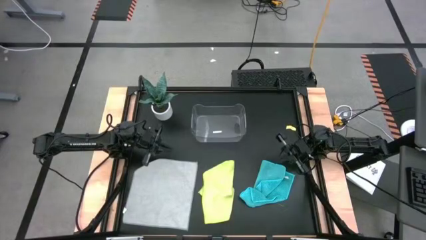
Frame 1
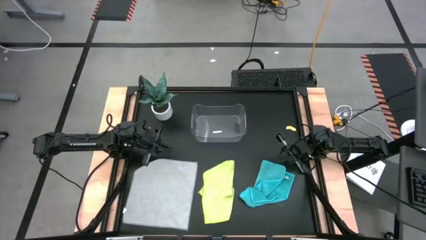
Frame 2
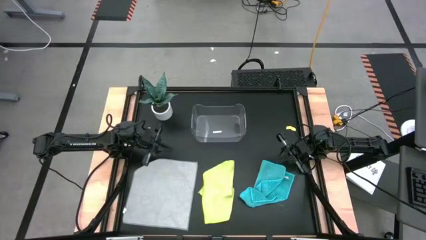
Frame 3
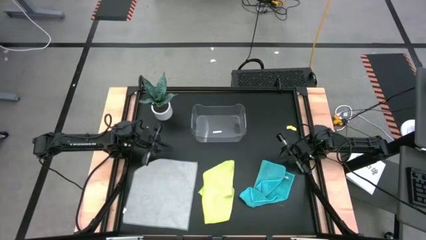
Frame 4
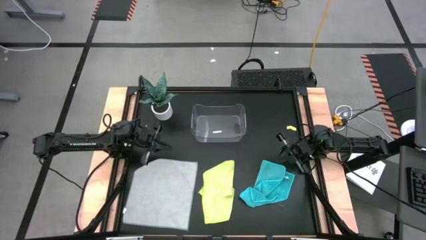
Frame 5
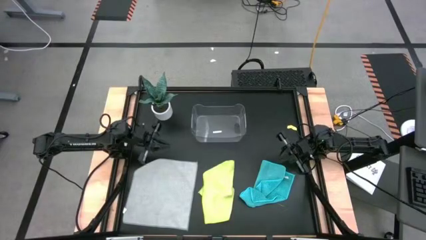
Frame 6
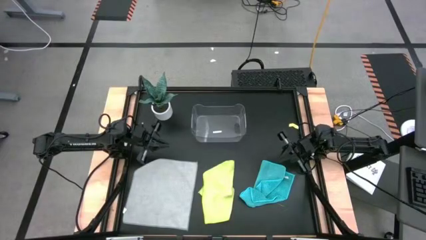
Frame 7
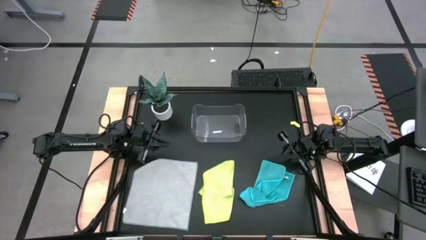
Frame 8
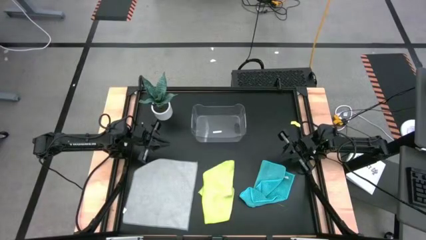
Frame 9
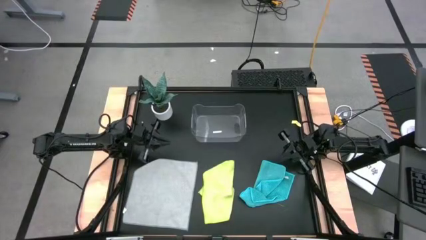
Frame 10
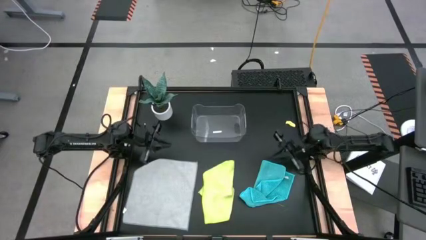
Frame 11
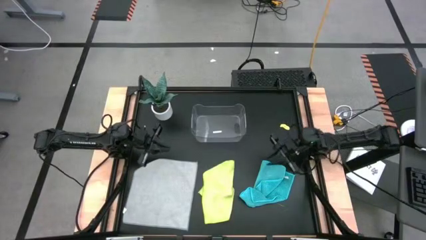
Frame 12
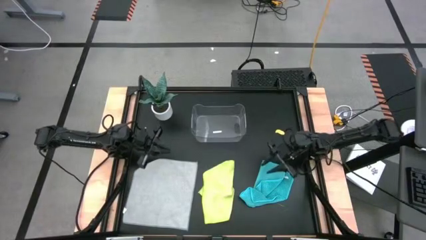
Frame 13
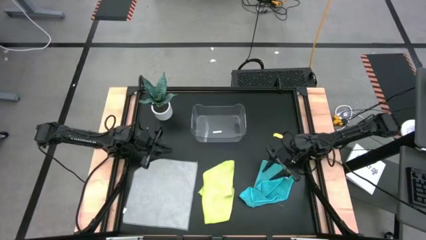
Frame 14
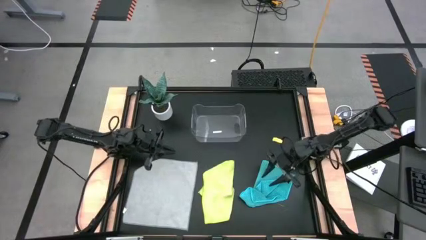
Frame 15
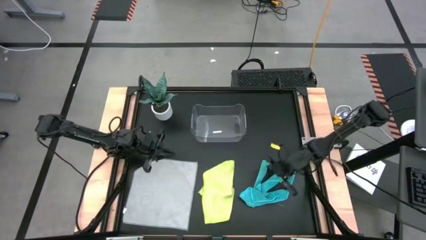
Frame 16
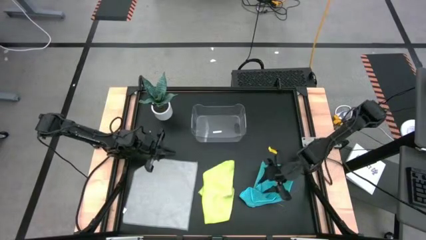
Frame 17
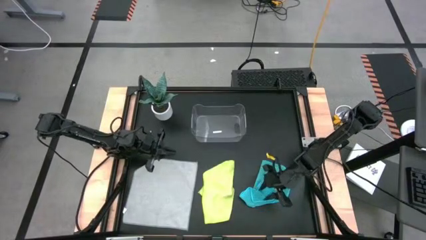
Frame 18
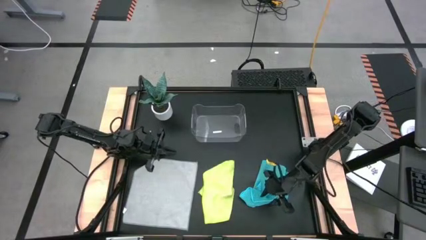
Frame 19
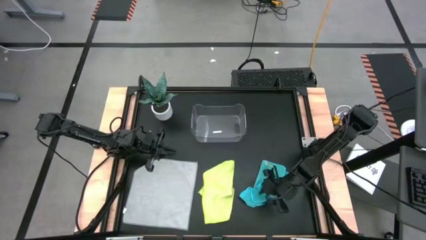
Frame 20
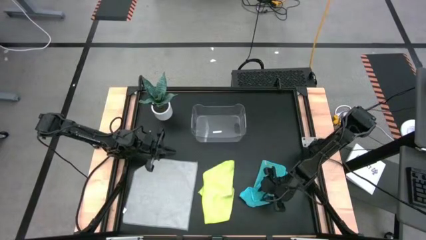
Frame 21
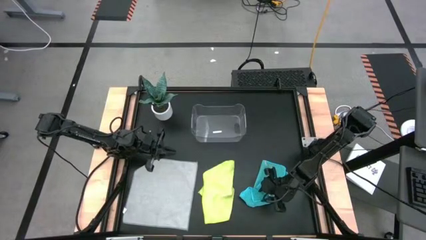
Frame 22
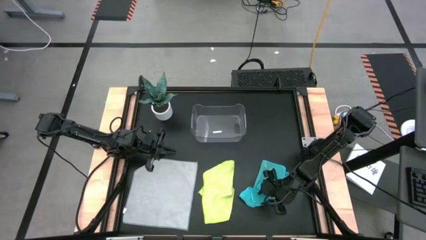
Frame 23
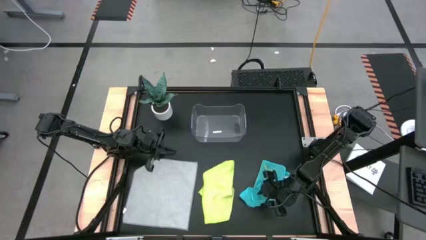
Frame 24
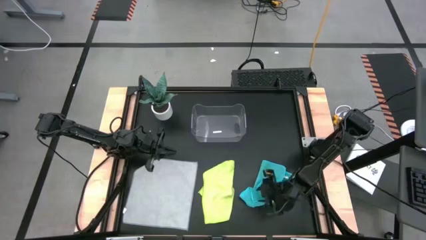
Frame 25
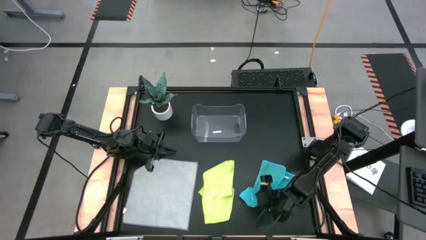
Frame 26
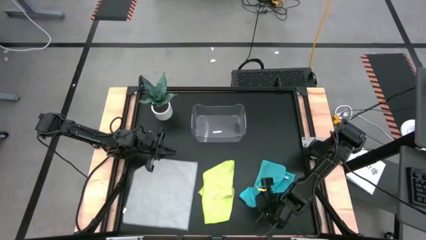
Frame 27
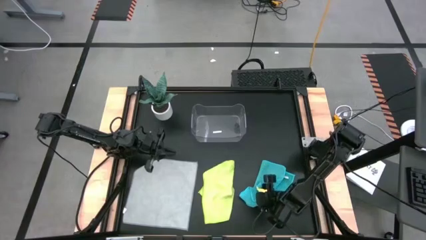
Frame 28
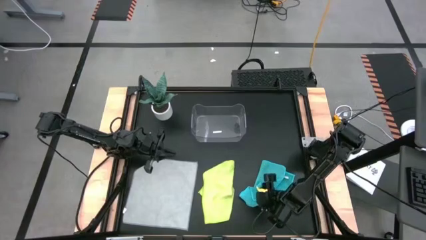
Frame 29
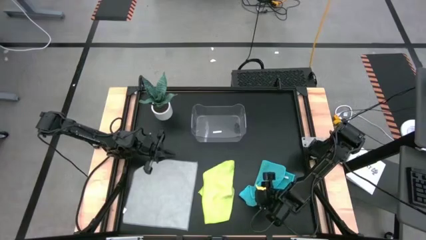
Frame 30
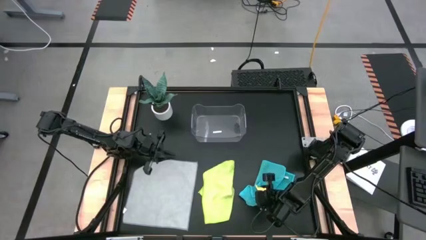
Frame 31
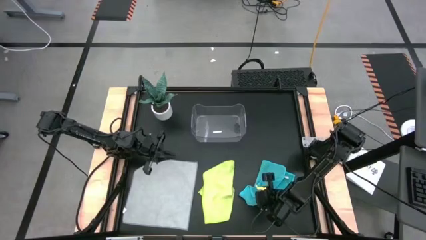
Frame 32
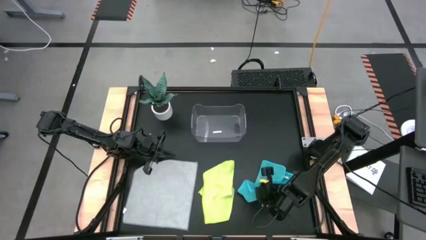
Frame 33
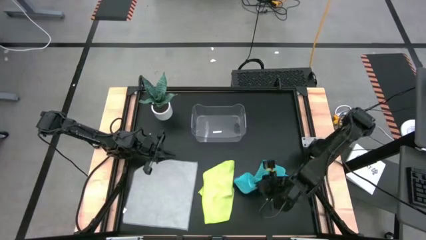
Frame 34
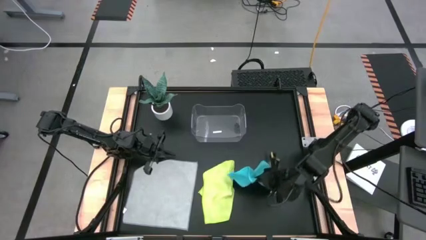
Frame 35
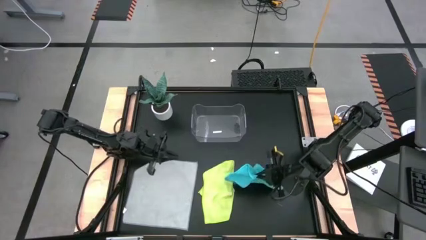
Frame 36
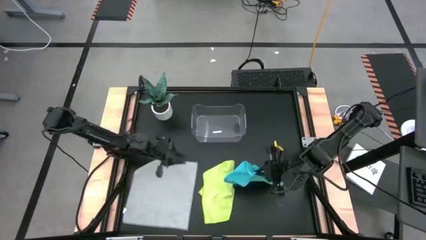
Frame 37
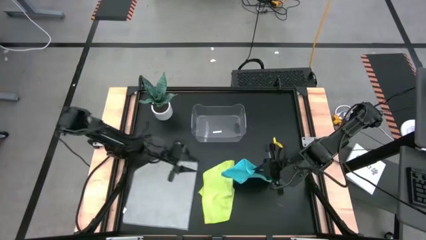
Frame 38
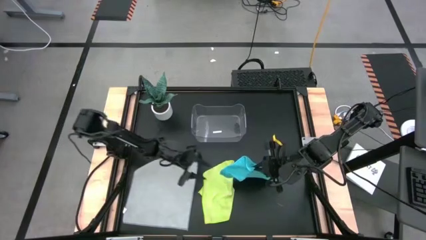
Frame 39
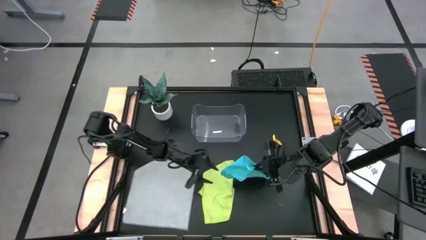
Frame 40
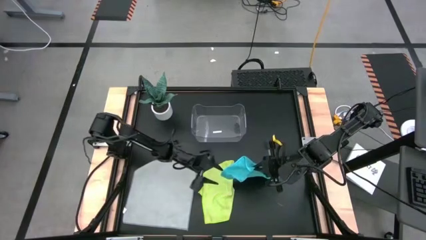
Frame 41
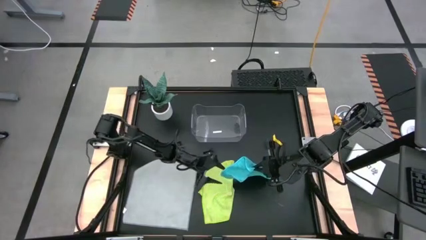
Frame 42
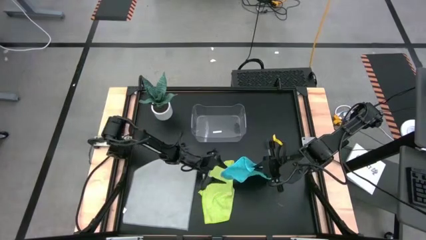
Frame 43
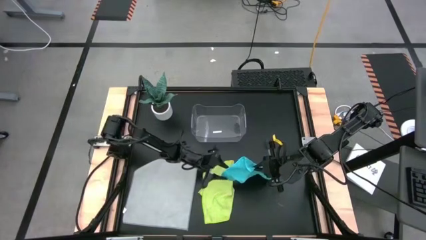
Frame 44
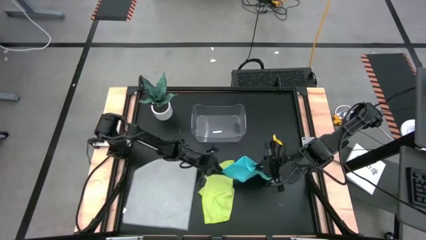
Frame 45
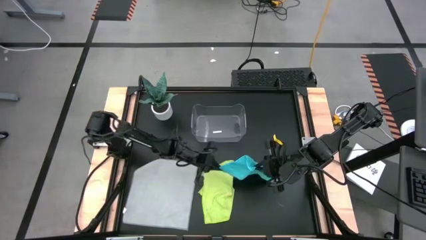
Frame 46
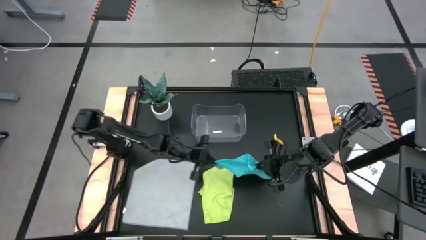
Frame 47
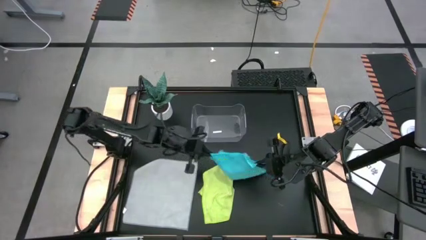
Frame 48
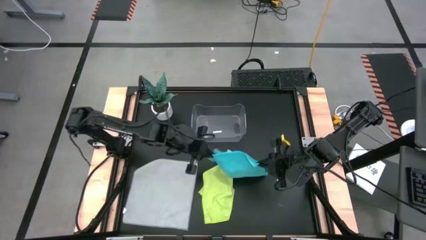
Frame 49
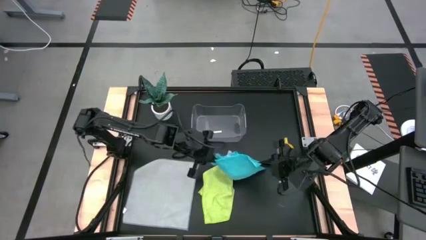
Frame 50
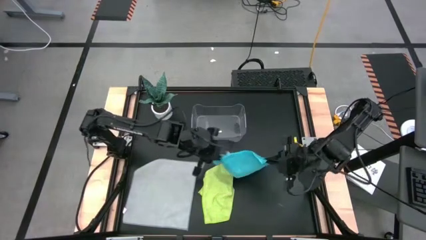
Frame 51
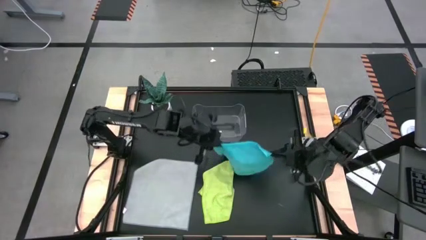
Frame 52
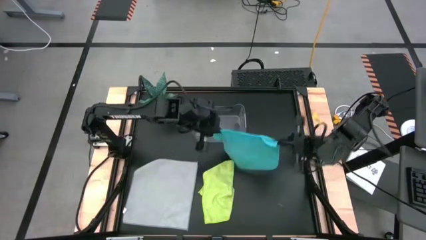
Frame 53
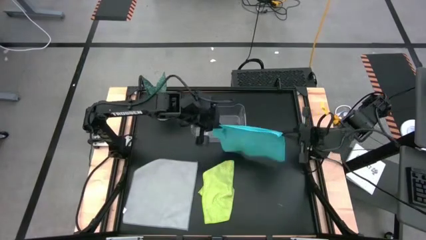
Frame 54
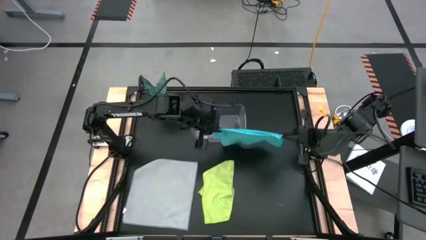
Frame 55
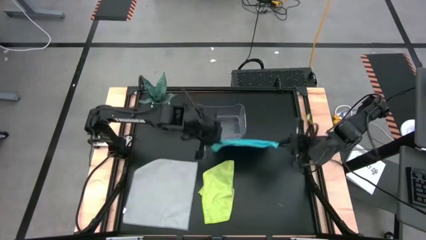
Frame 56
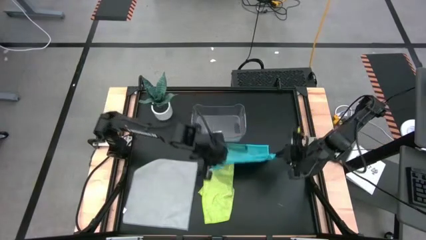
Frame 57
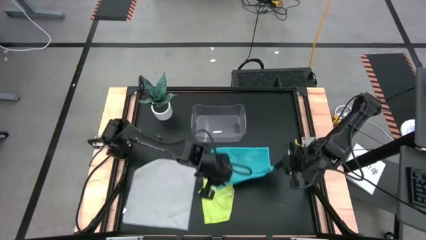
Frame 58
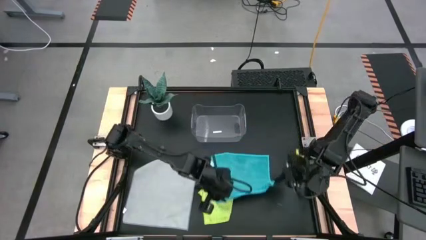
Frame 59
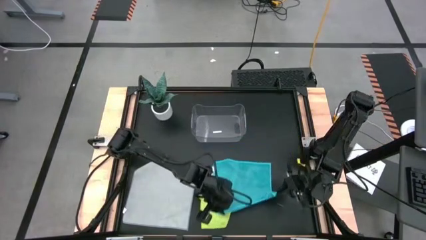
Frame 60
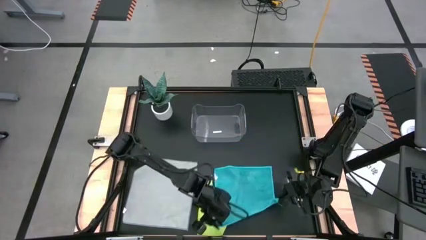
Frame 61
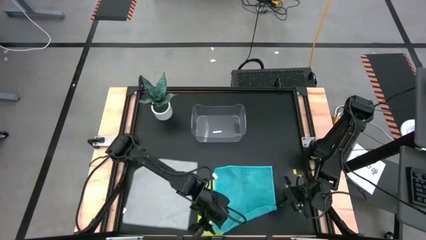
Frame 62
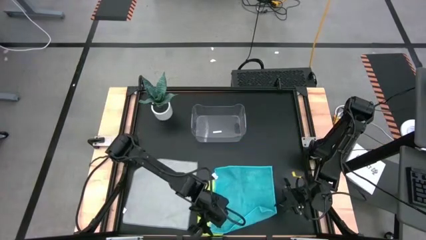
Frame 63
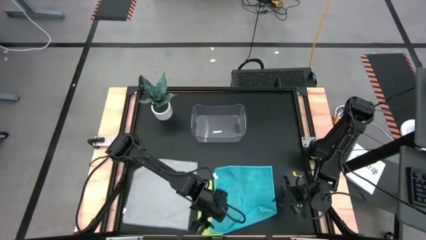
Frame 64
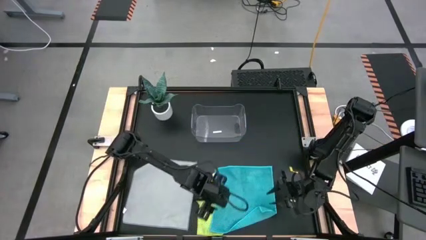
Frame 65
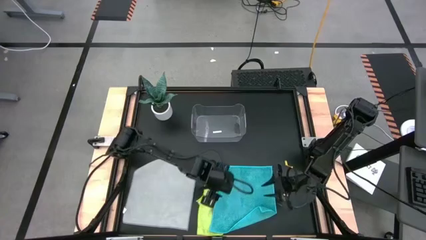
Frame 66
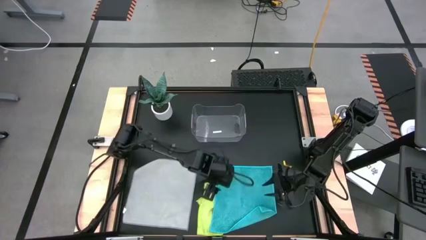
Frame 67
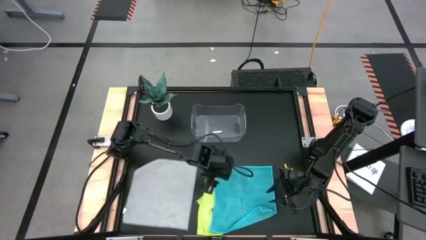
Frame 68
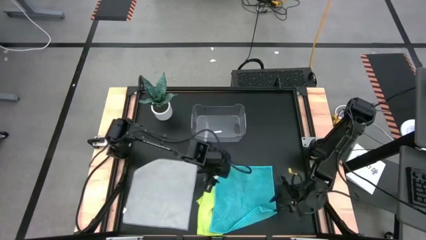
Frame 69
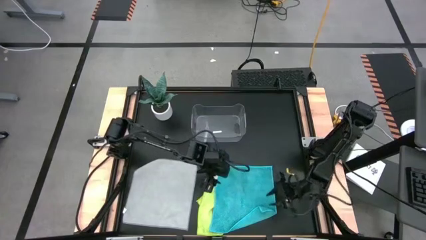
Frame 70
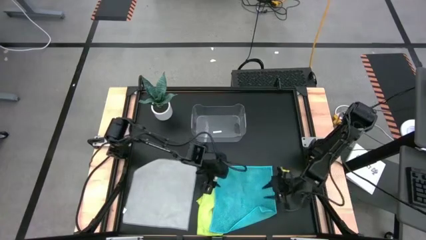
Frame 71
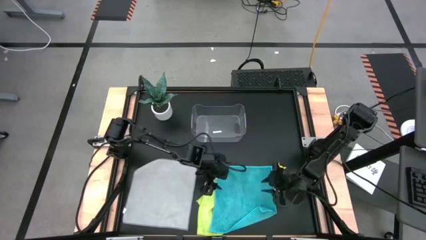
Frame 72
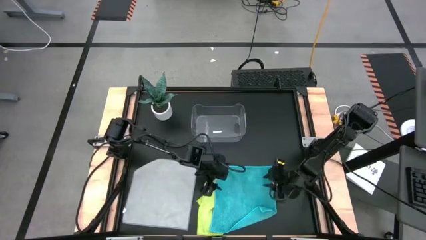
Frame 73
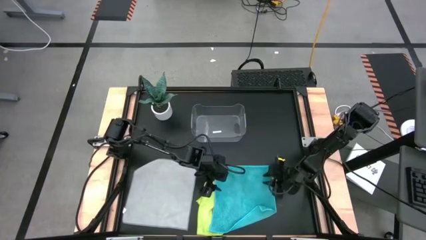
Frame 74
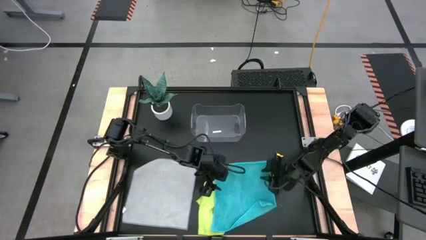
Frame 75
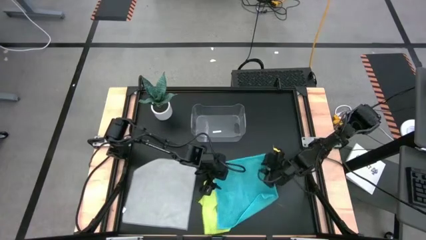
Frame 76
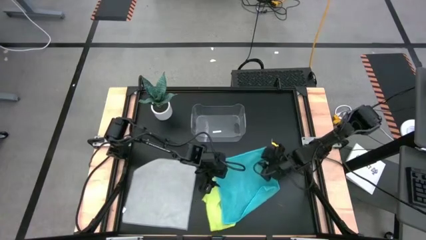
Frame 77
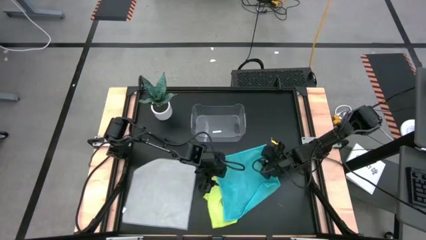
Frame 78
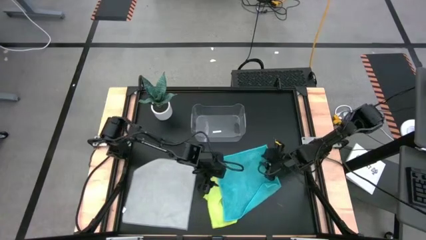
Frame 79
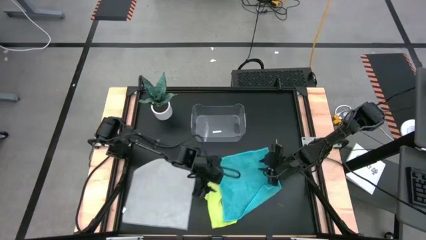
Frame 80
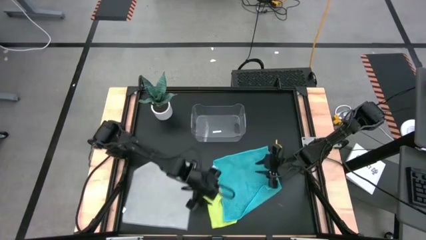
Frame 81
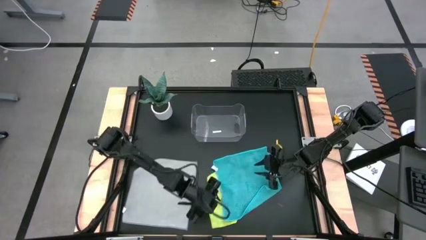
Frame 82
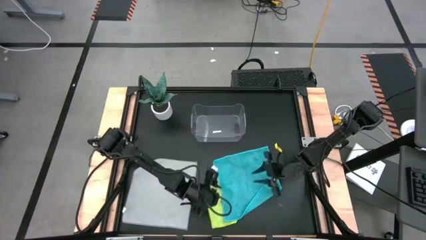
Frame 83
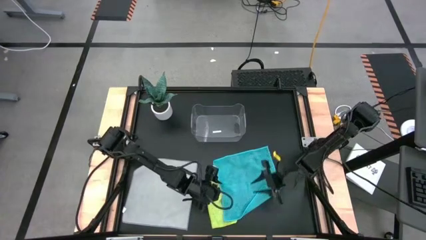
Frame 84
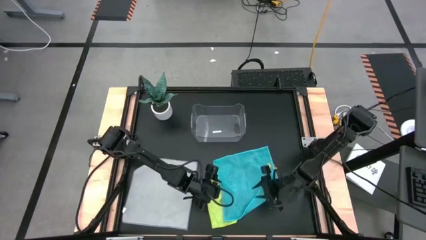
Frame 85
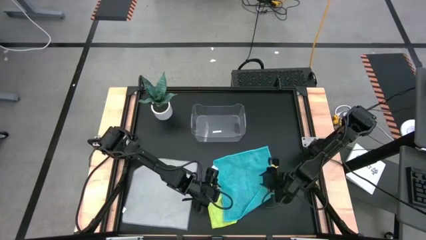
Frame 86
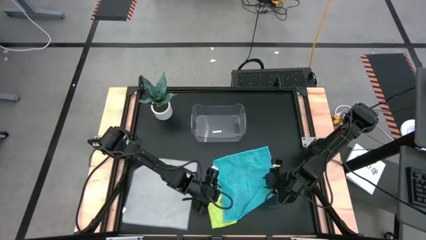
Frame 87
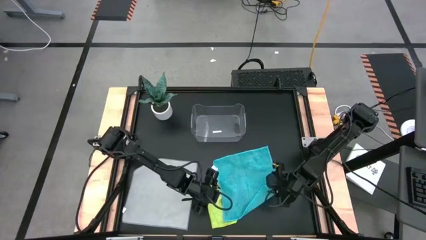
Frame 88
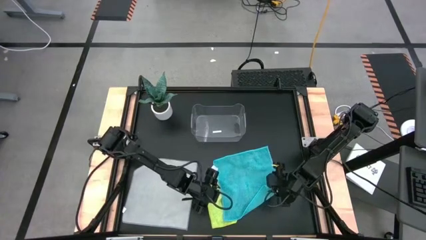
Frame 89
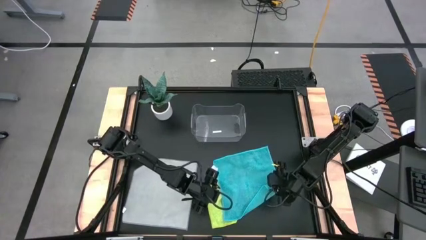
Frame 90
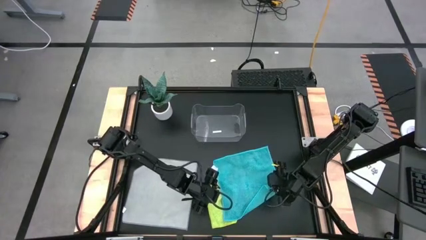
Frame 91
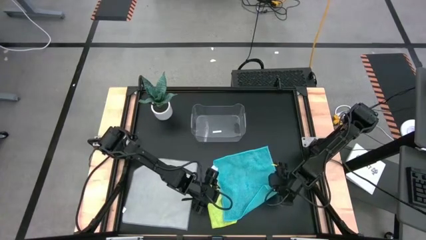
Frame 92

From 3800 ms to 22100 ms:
Task: Fold microfiber towels
Fold the blue towel
